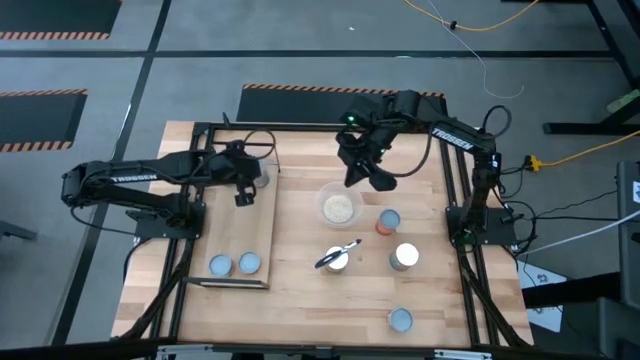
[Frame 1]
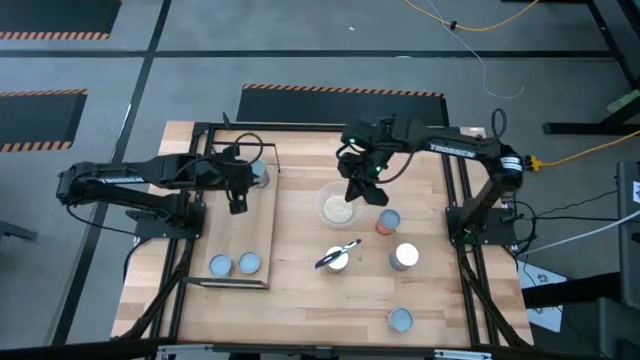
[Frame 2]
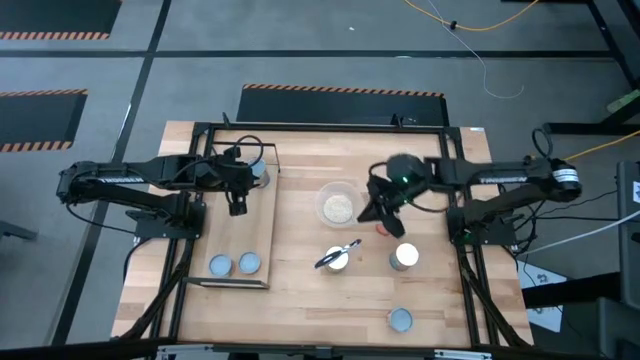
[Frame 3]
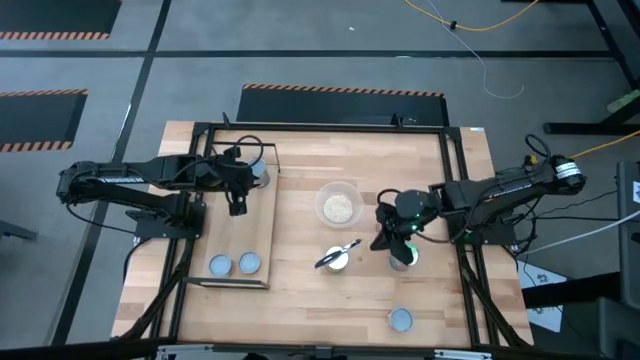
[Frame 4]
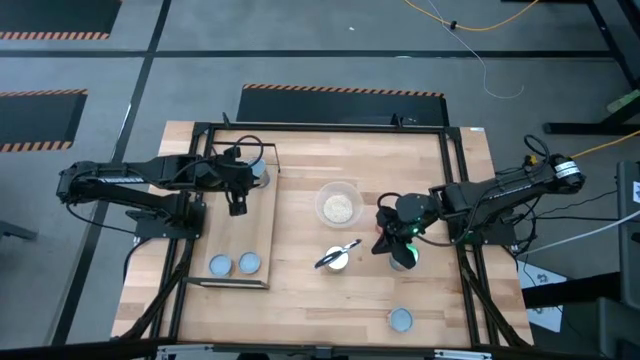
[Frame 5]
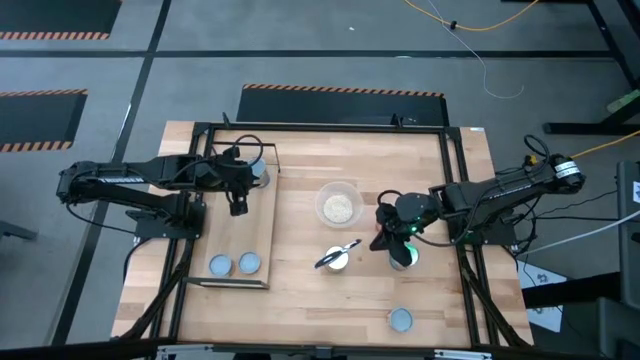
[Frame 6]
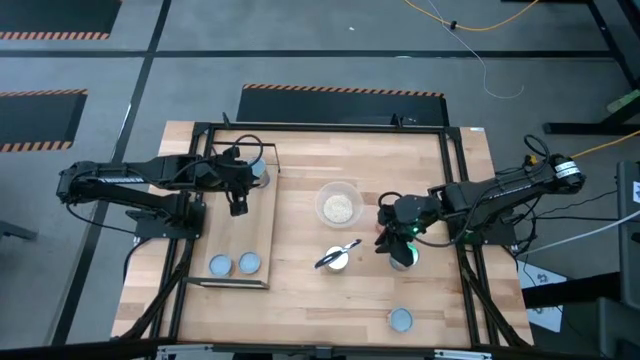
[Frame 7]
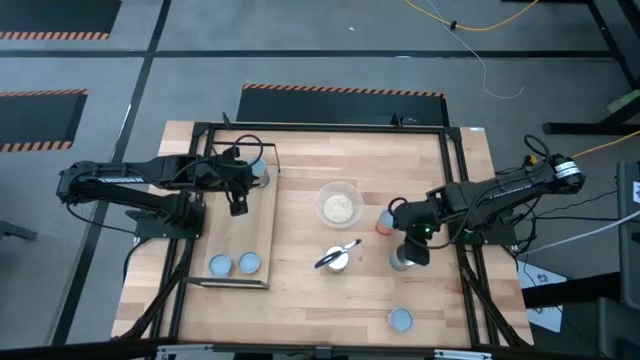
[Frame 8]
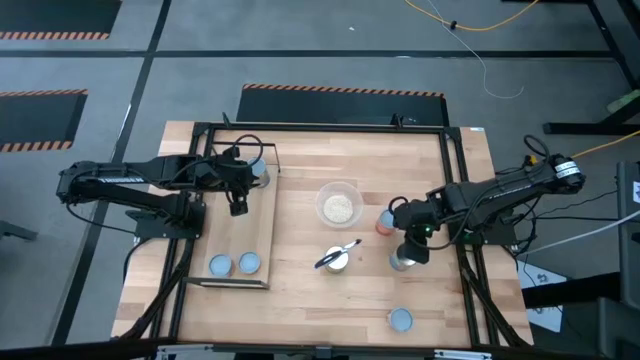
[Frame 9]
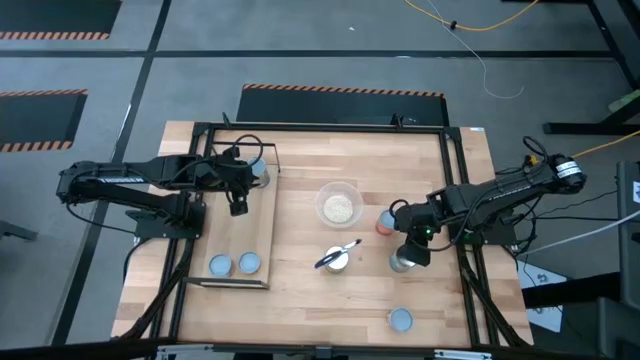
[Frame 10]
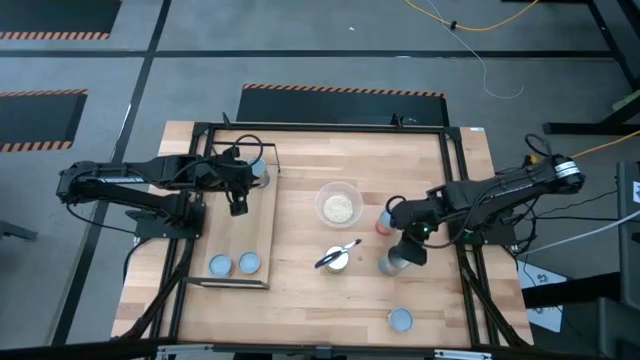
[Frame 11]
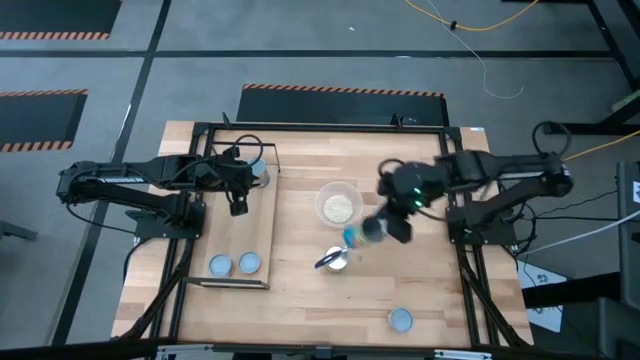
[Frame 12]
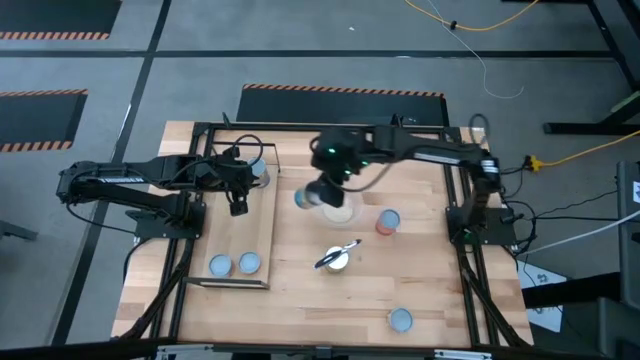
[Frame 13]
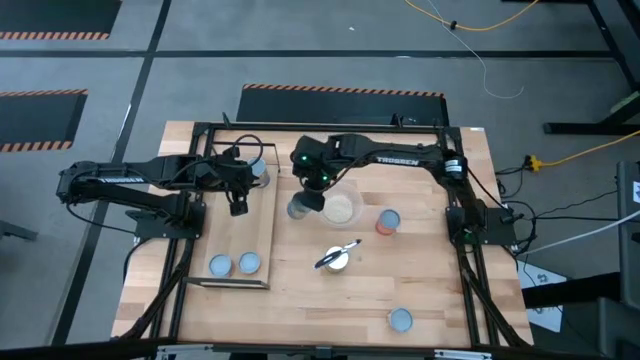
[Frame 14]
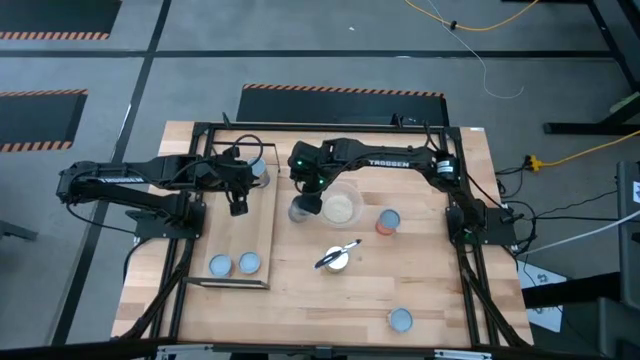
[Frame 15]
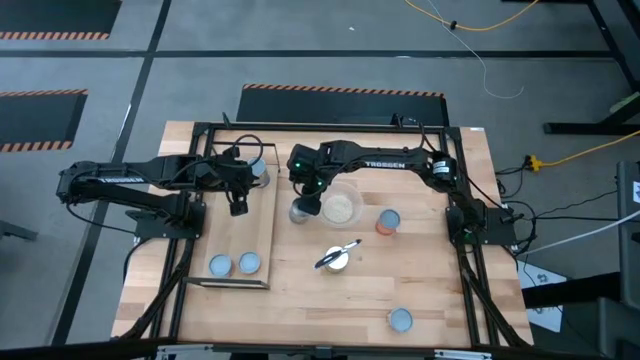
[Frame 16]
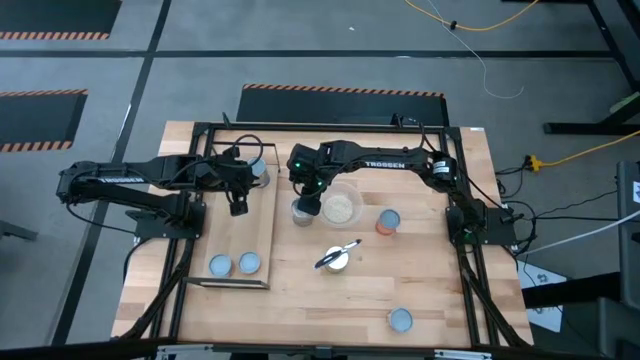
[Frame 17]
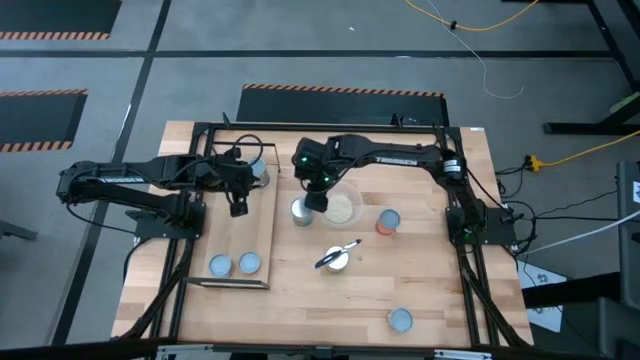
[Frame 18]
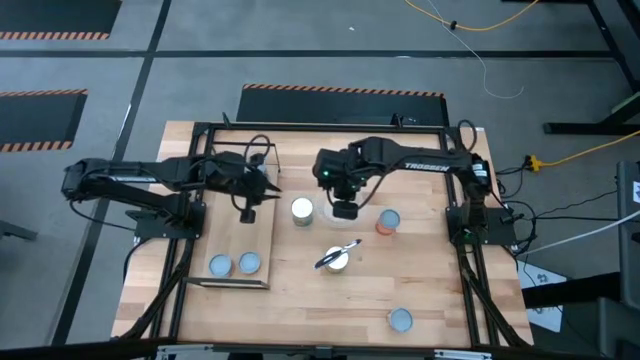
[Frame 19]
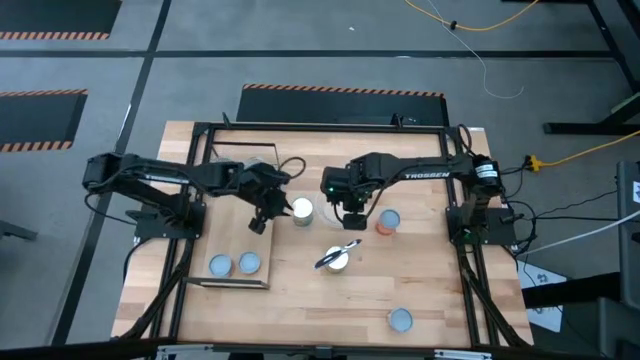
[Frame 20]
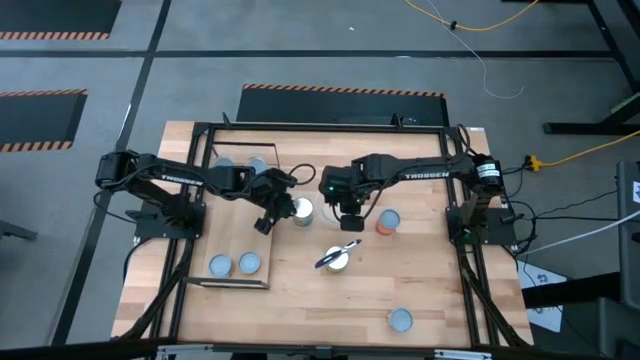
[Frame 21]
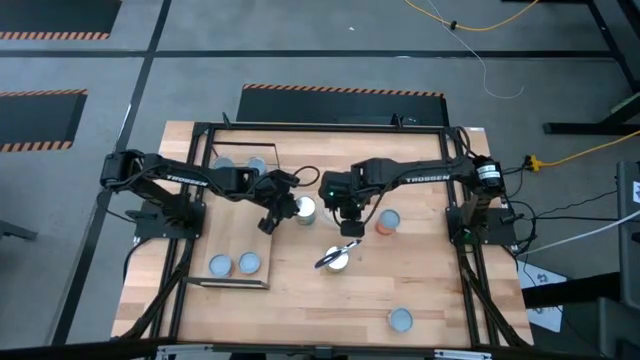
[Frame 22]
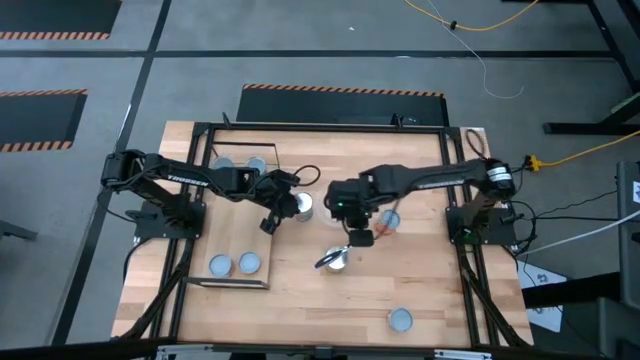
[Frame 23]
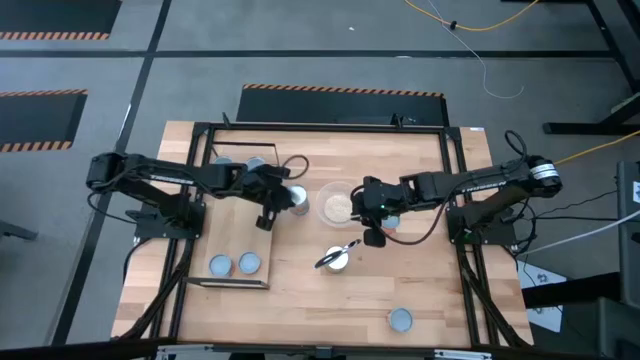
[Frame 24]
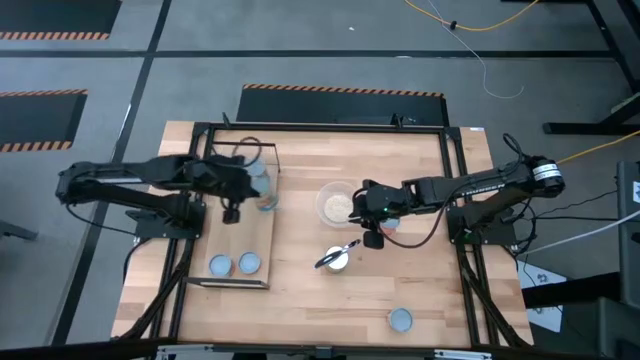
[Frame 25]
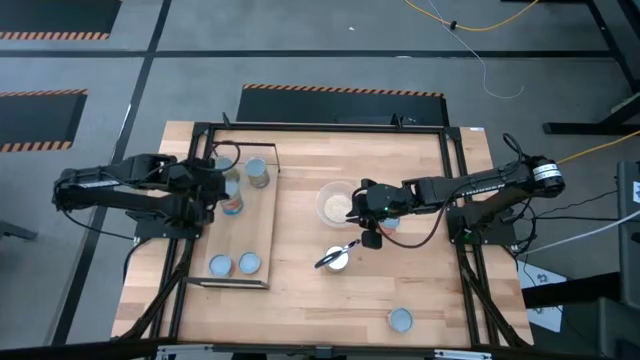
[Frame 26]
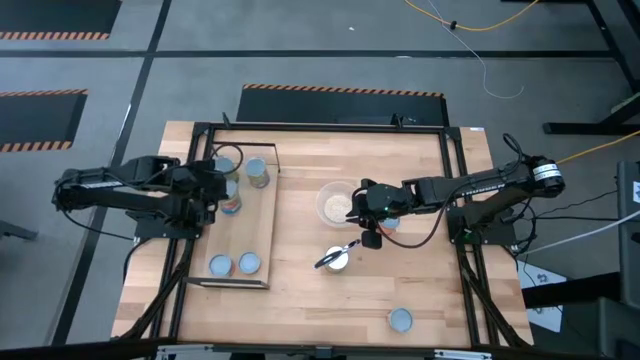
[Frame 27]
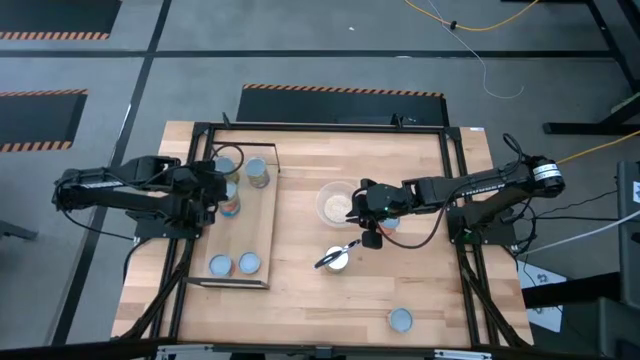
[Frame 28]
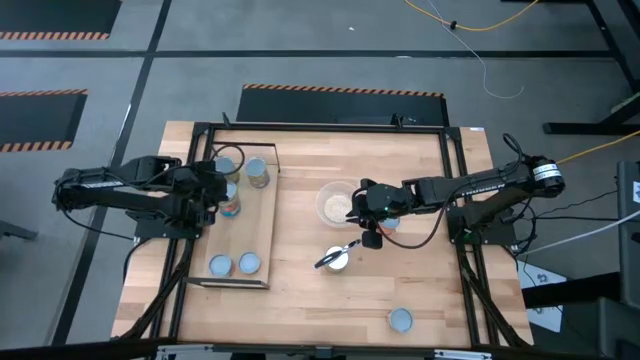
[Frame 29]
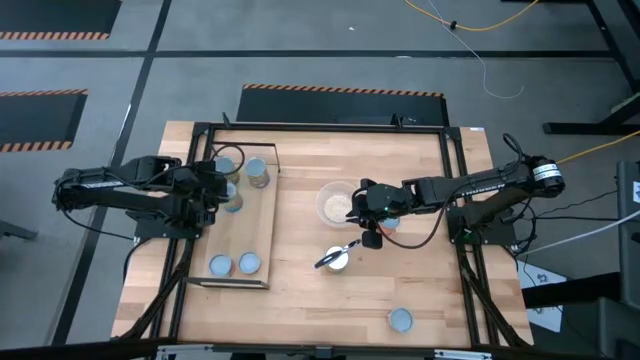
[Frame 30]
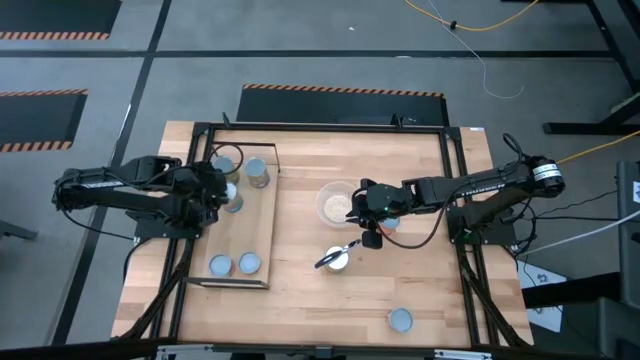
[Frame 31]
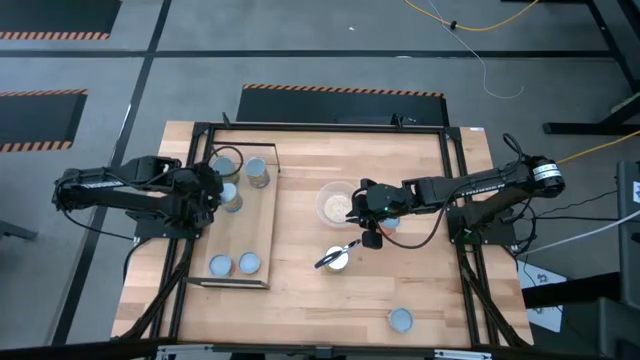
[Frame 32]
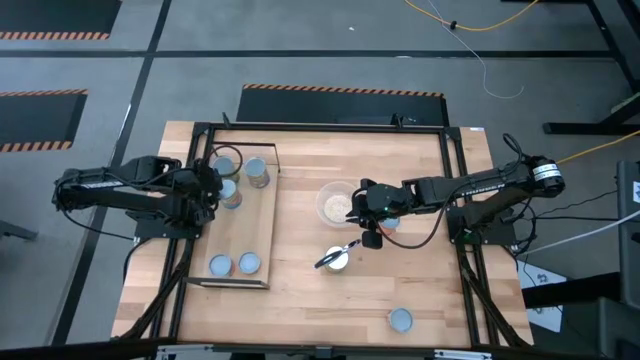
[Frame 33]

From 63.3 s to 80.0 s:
Task: Pick and place cans onto a shelf
Put the canned tomatoes on the shelf

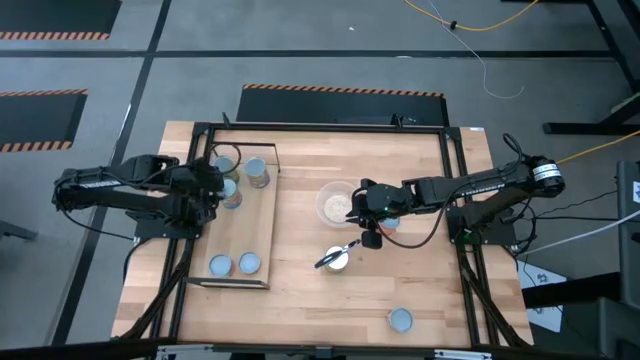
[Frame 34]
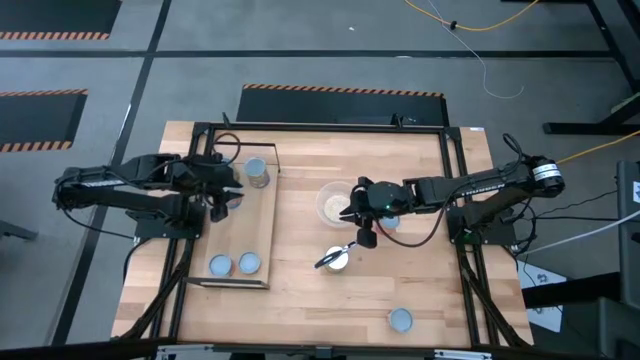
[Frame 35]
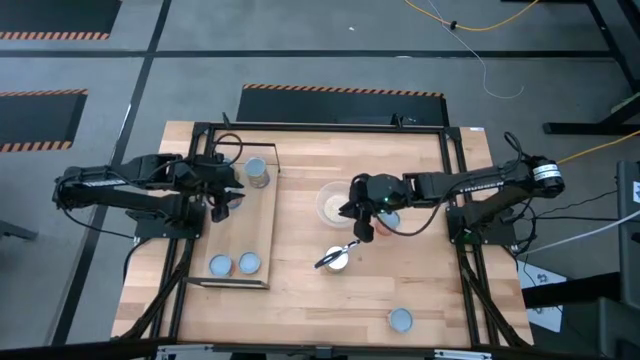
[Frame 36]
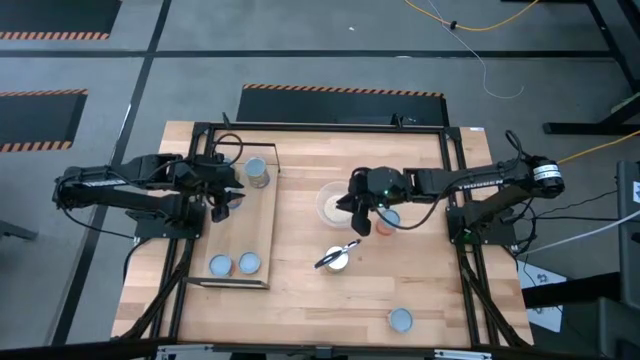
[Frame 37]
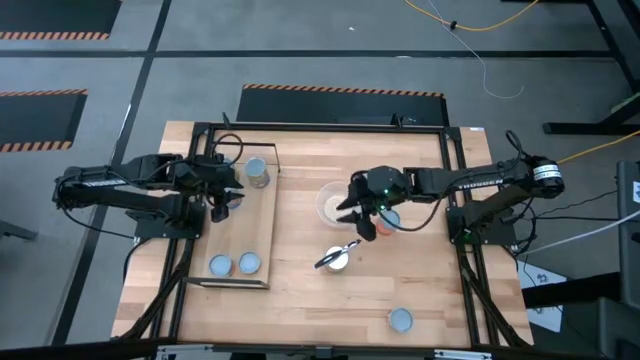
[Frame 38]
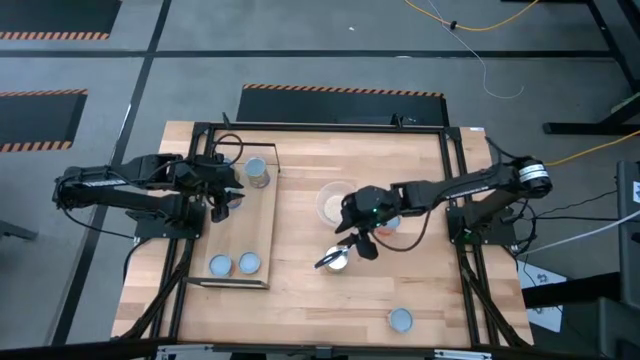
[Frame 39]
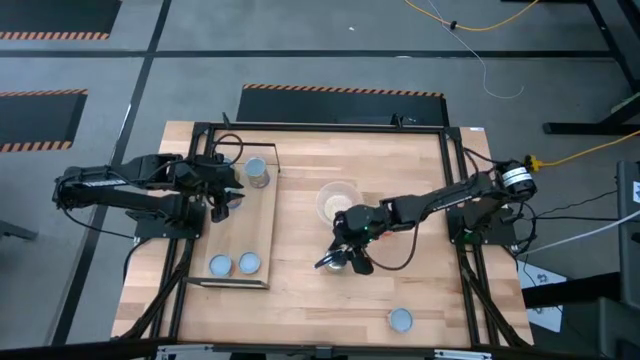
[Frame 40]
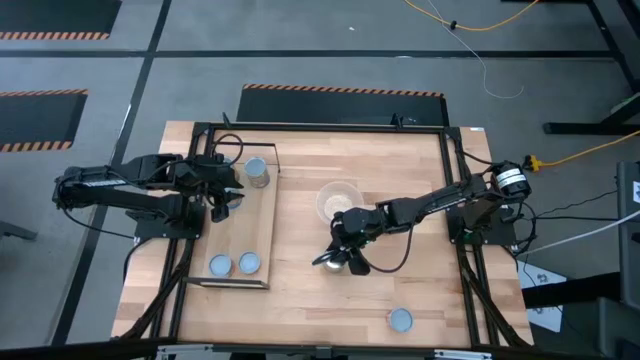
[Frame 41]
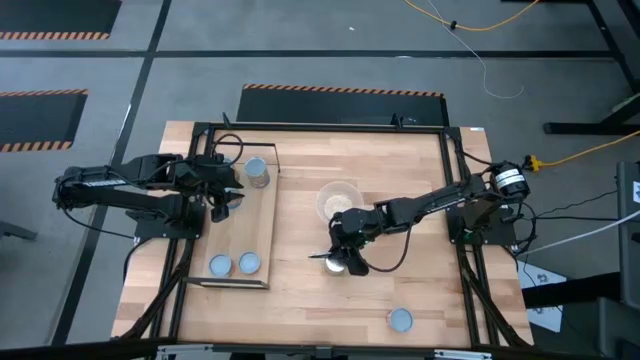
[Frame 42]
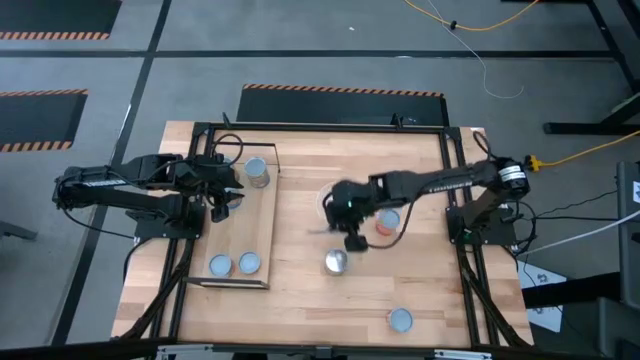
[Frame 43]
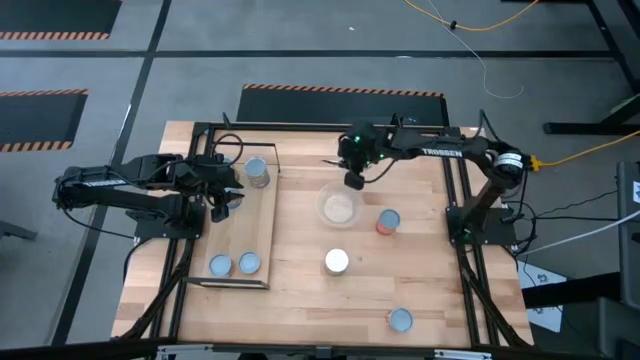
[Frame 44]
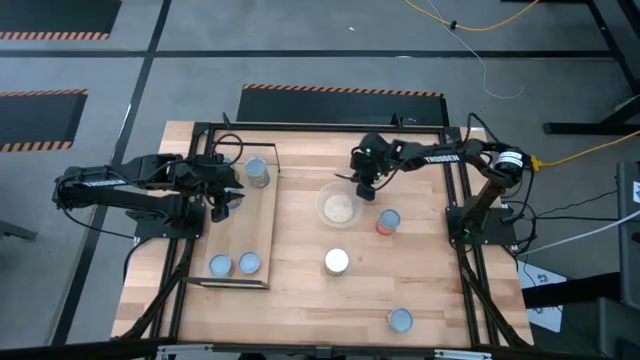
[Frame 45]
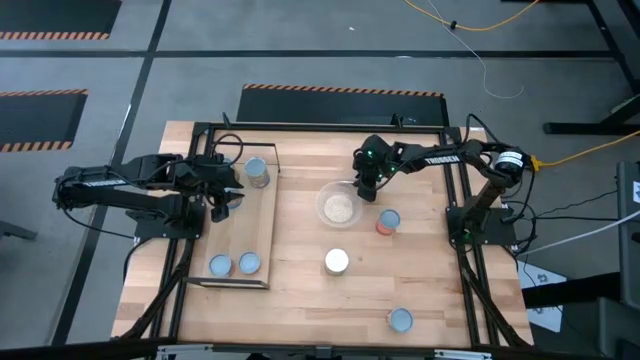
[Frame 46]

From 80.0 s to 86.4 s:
Remove the black peeler from the top of the canned oranges
